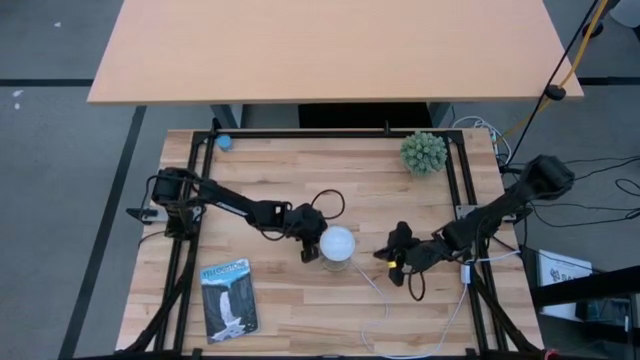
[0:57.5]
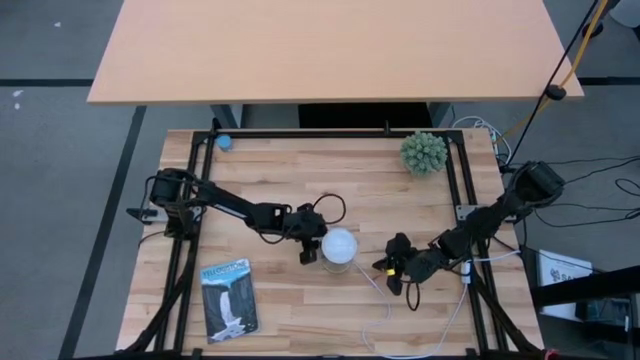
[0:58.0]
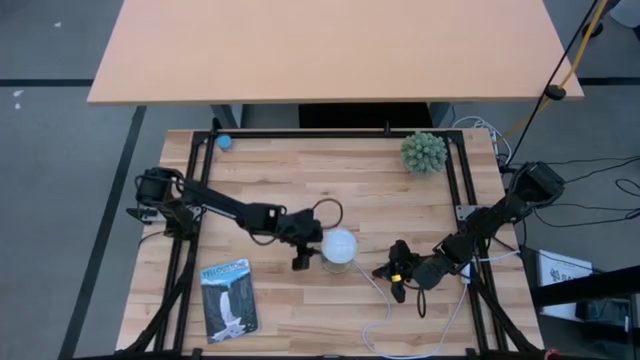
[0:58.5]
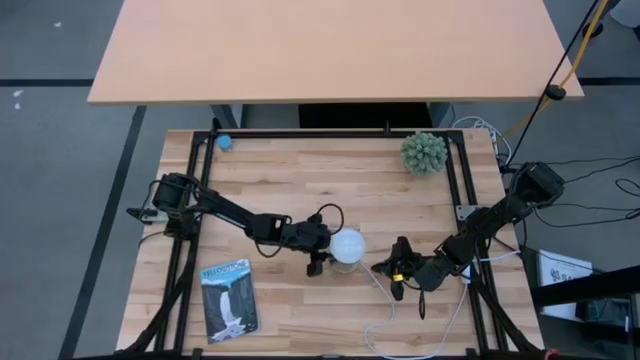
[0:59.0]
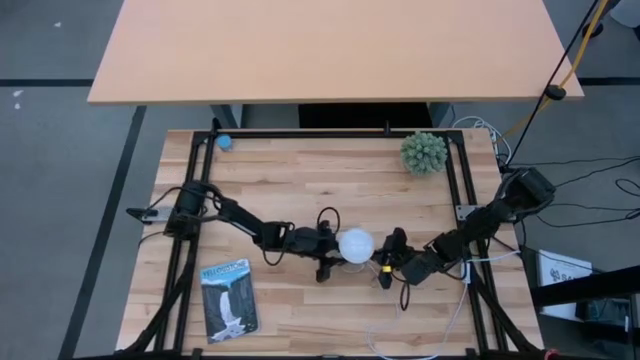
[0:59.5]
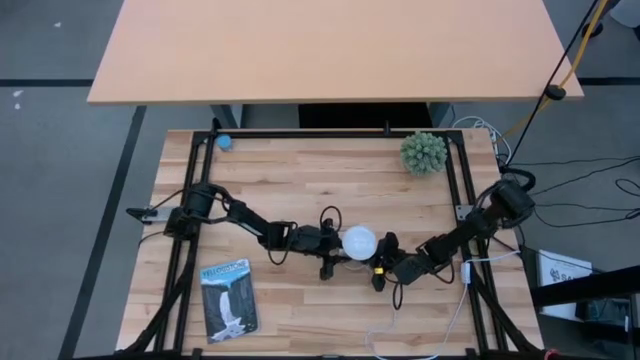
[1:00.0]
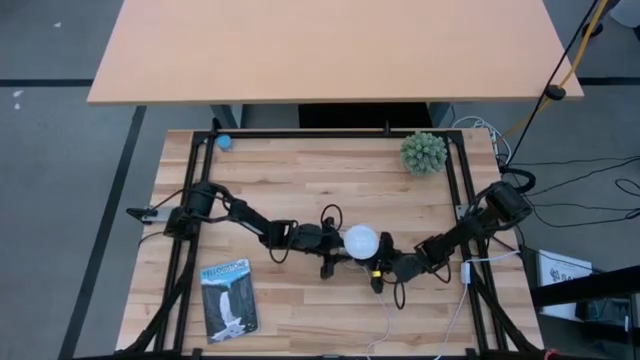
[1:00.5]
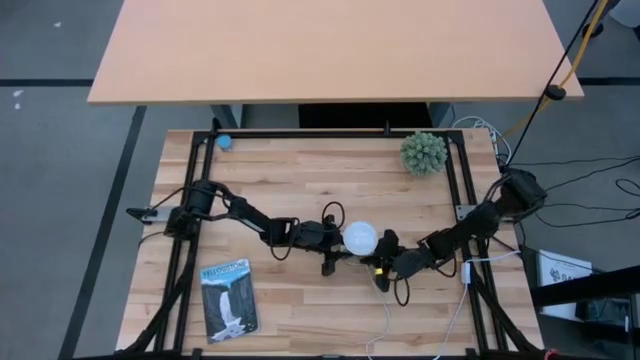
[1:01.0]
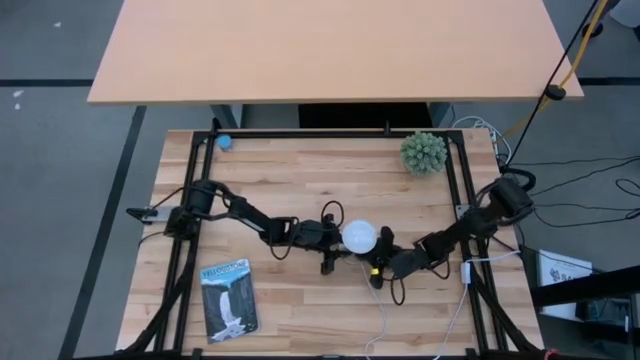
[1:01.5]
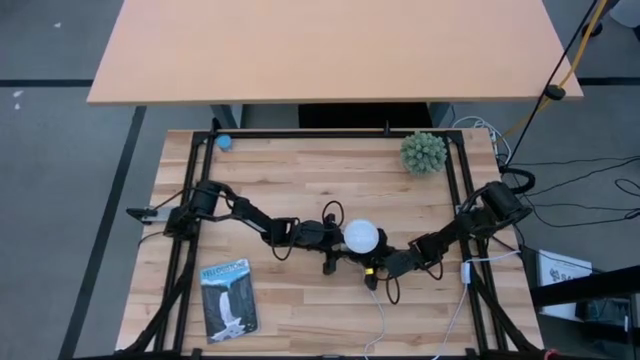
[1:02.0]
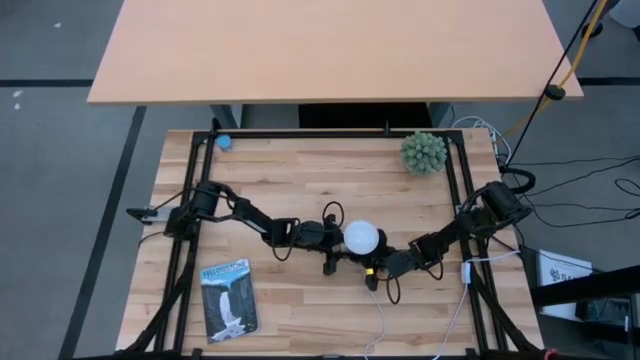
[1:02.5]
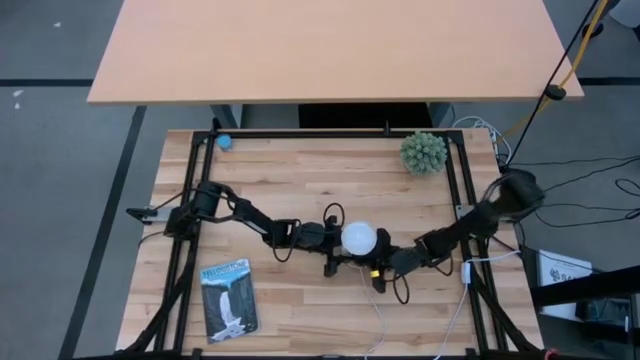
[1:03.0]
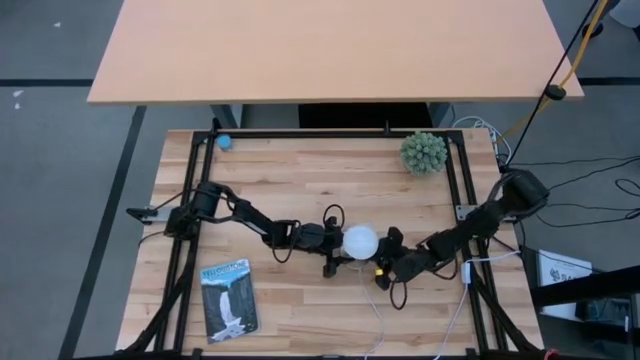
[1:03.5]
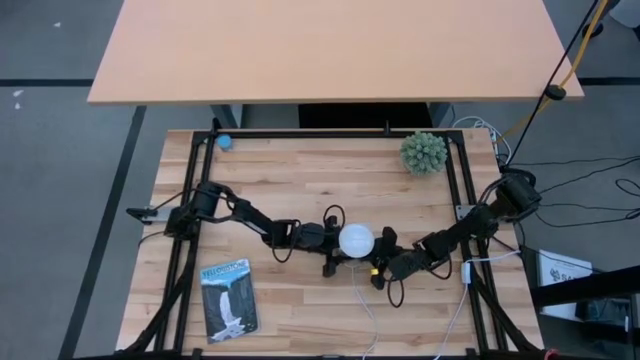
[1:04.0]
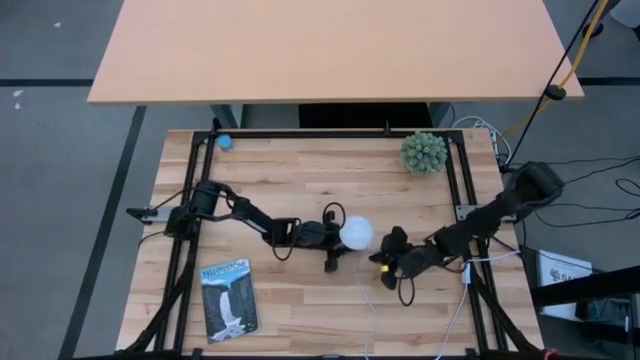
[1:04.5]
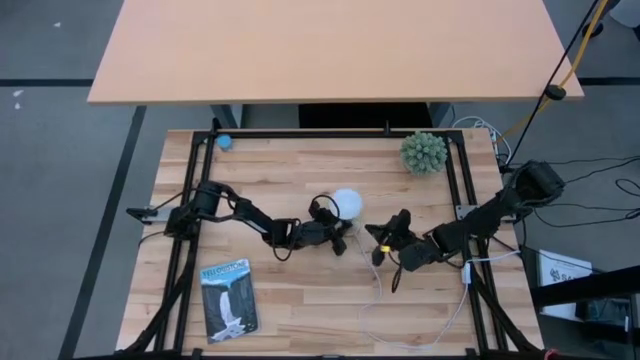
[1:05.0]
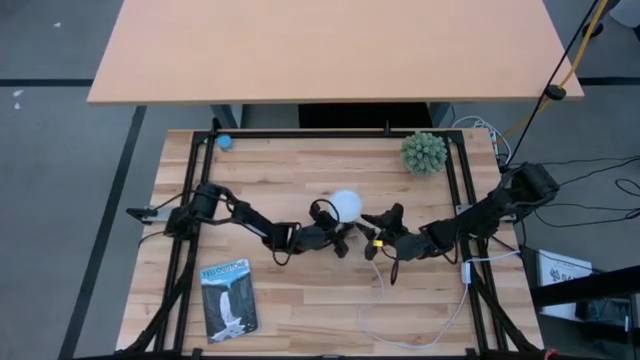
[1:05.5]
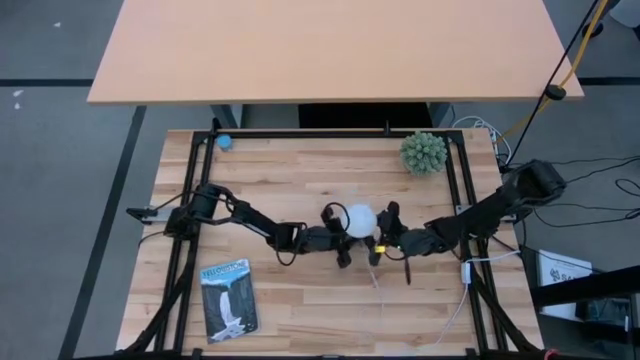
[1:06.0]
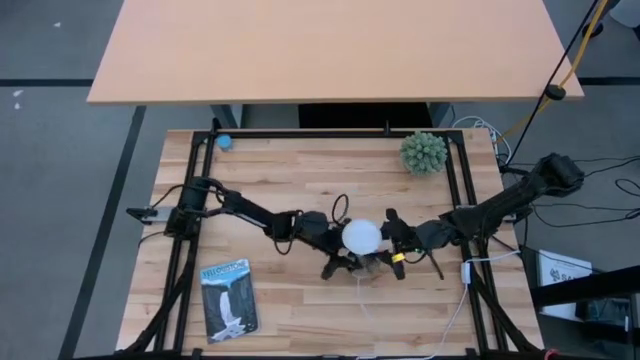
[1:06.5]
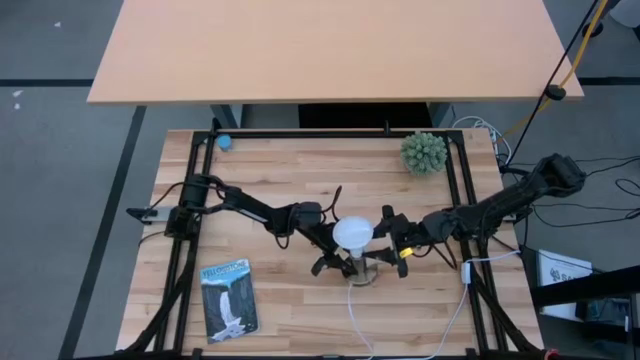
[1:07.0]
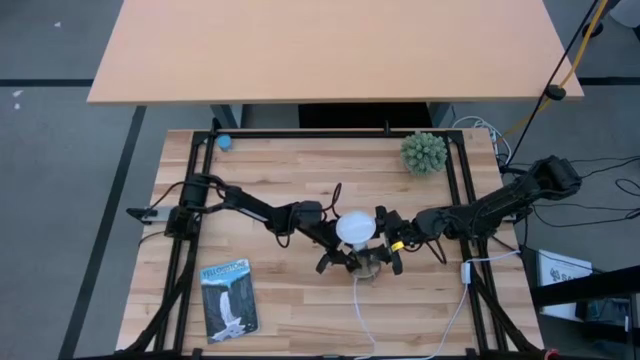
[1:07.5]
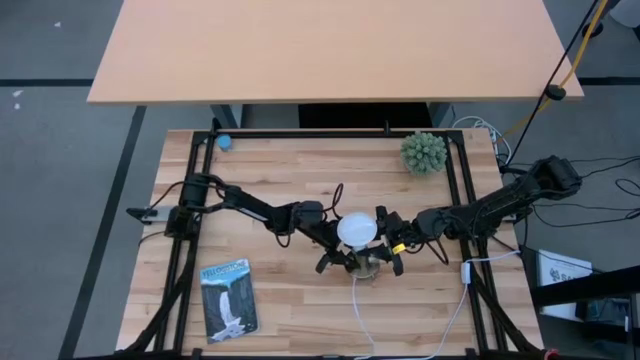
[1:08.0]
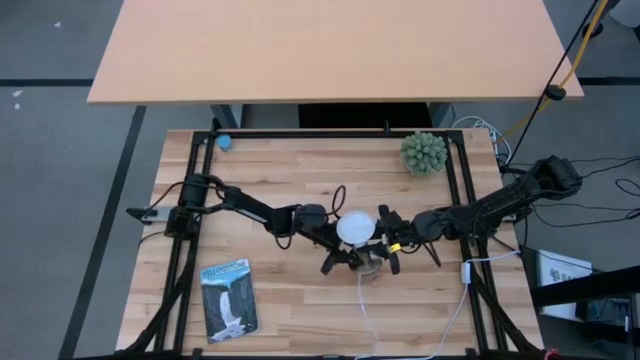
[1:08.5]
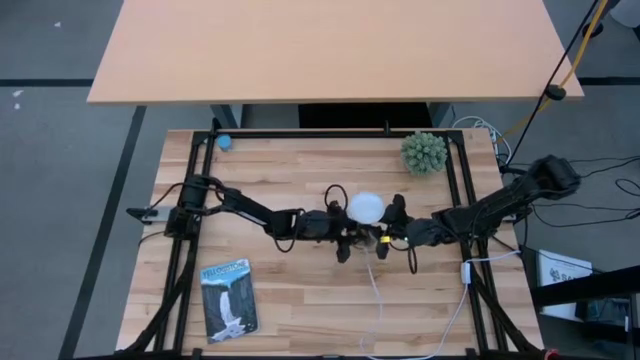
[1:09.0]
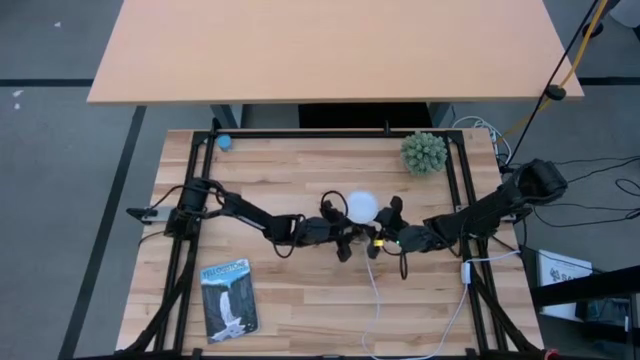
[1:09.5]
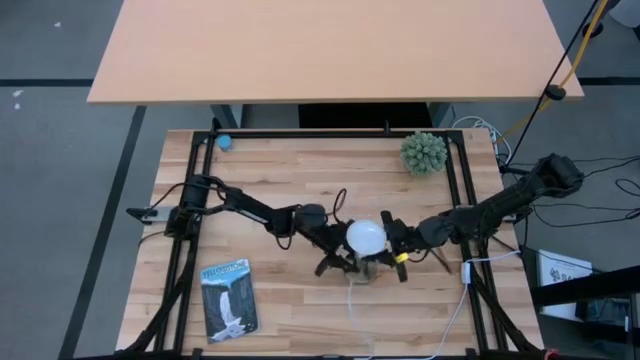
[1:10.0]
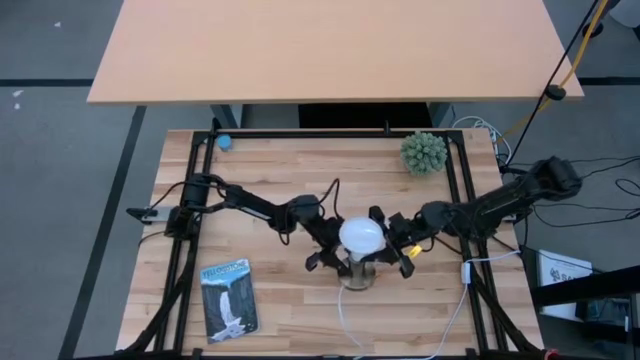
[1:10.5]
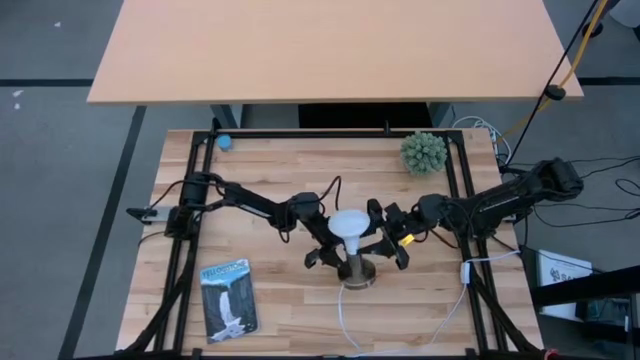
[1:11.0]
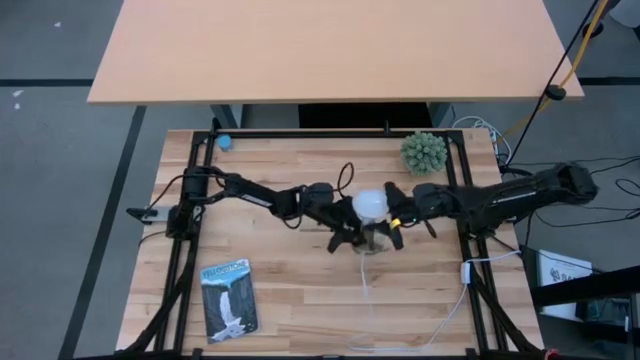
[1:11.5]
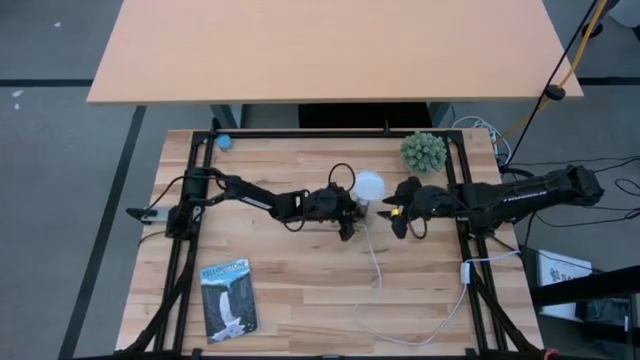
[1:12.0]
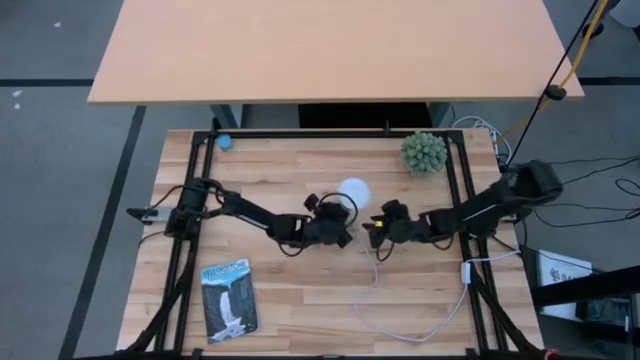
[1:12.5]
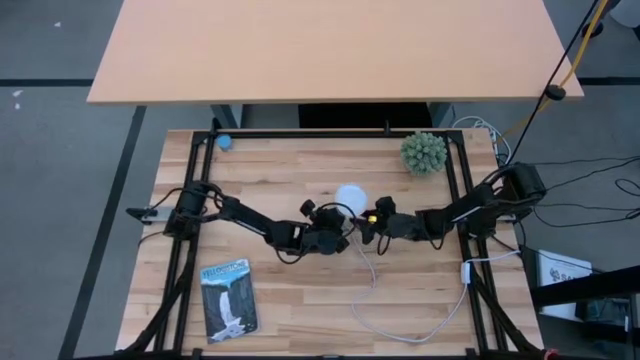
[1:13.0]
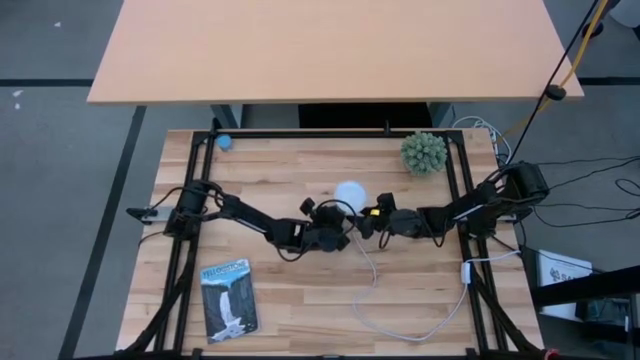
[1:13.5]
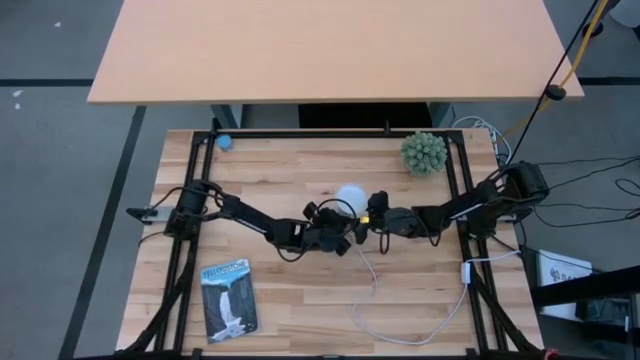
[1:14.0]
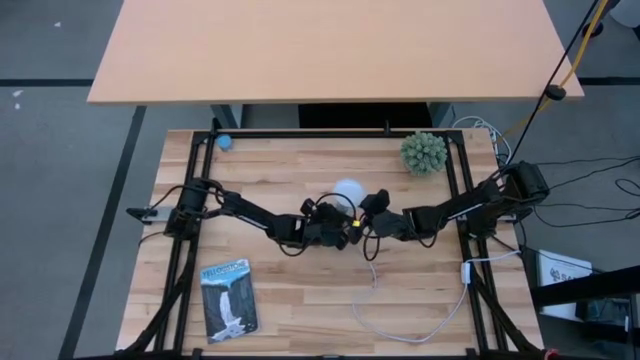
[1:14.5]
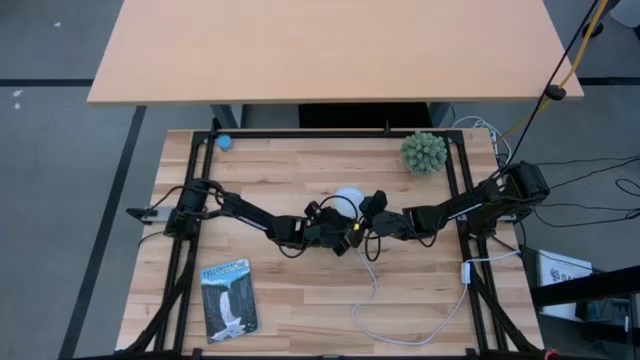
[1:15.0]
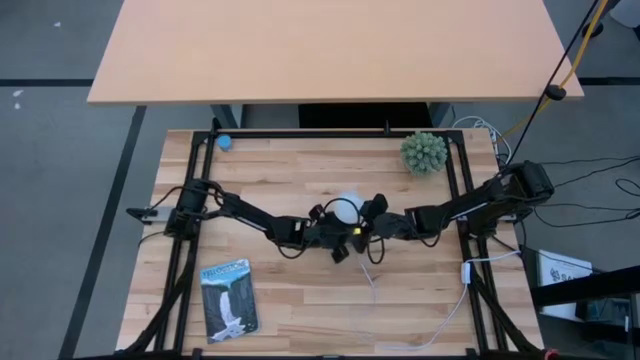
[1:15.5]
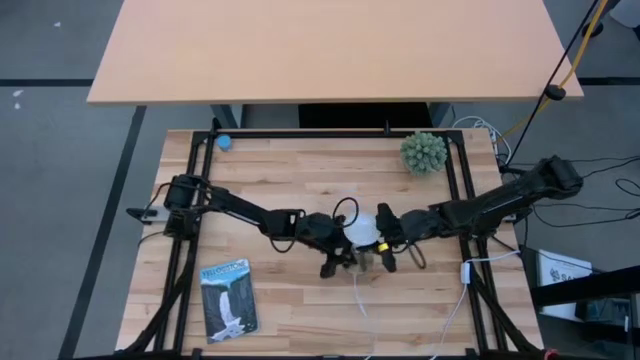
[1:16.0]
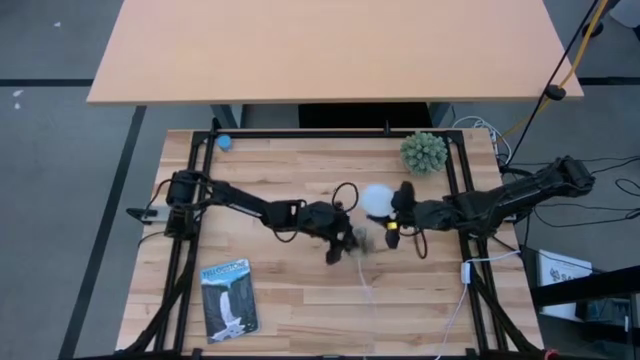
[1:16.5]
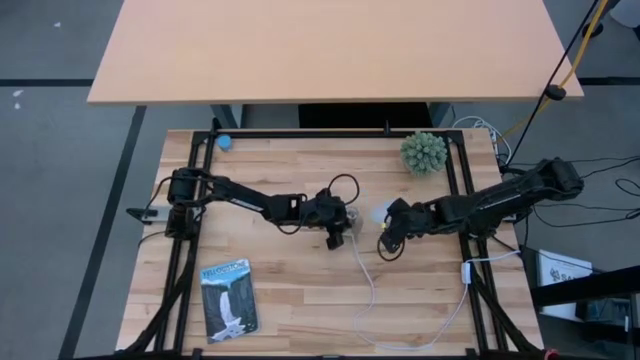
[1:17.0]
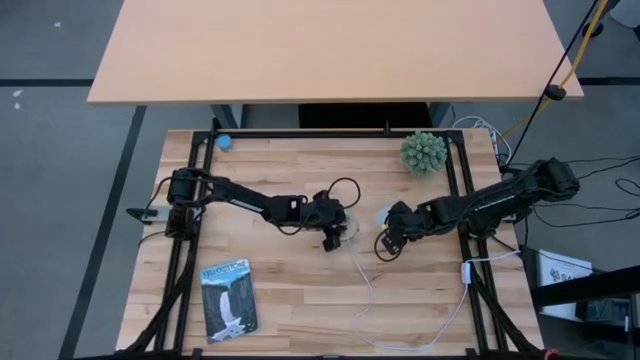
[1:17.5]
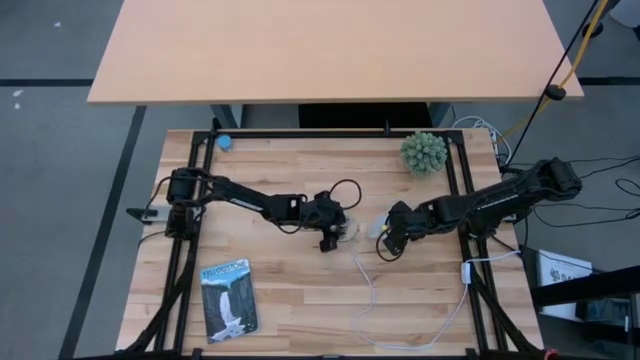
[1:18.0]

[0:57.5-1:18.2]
Task: Screw lightbulb
Remove the lightbulb from the lamp
